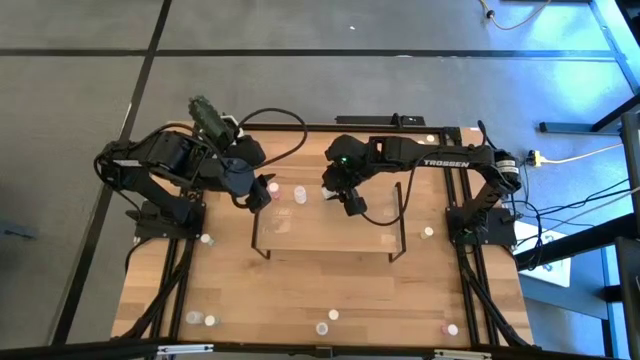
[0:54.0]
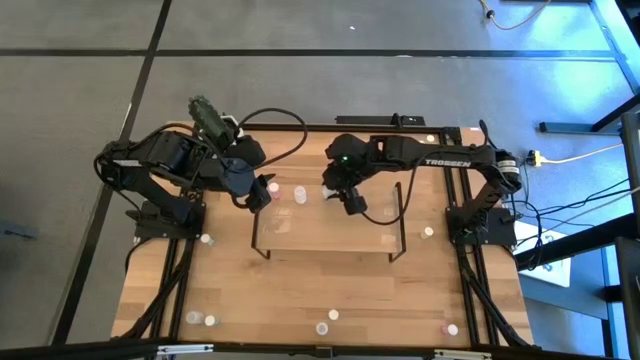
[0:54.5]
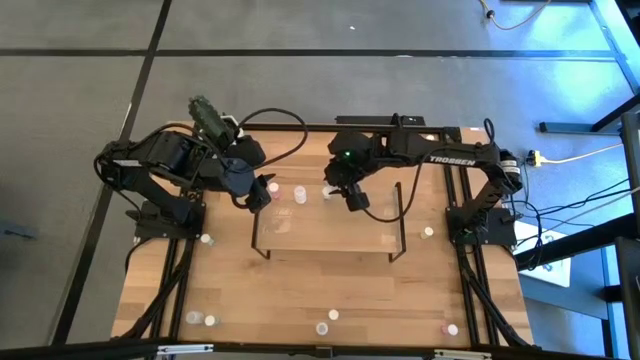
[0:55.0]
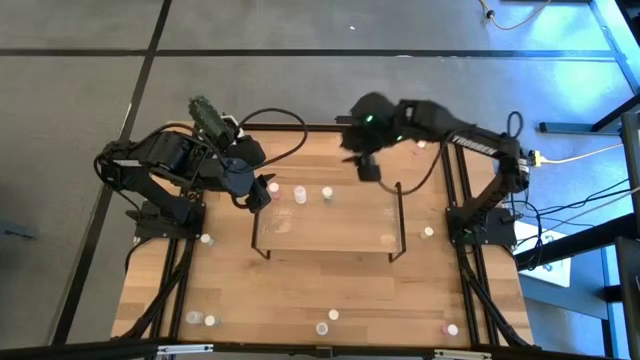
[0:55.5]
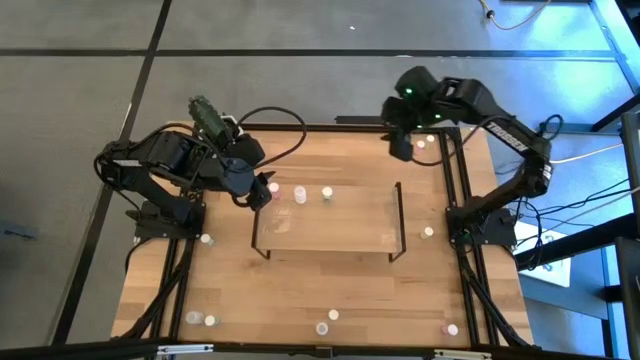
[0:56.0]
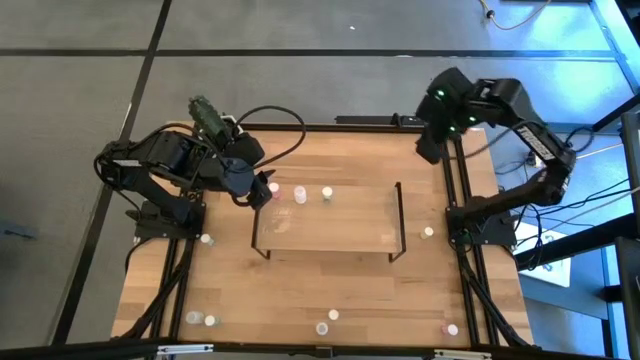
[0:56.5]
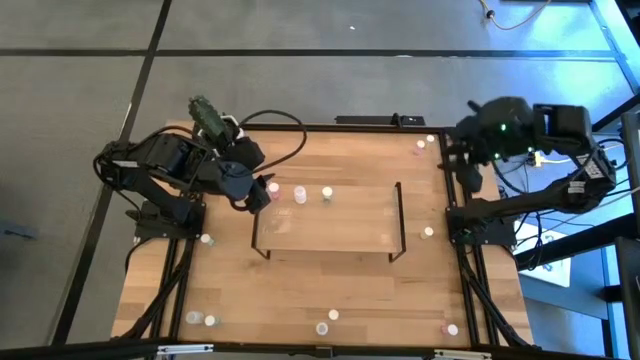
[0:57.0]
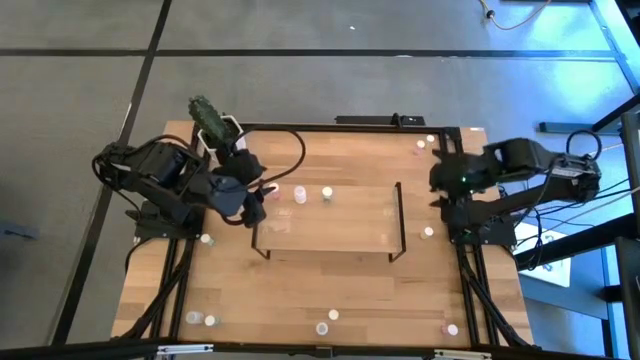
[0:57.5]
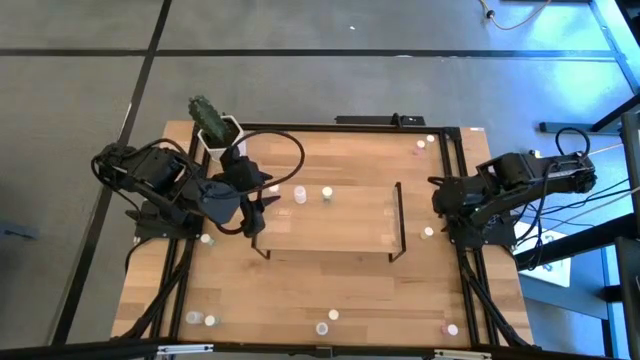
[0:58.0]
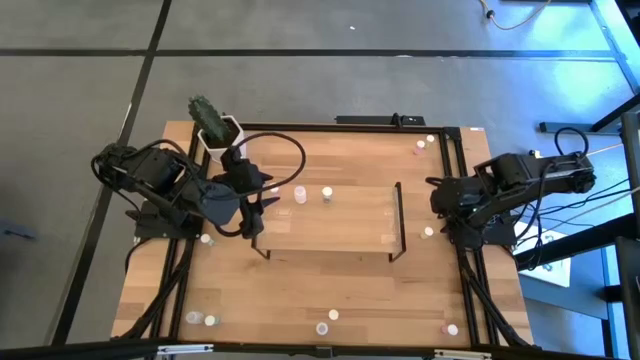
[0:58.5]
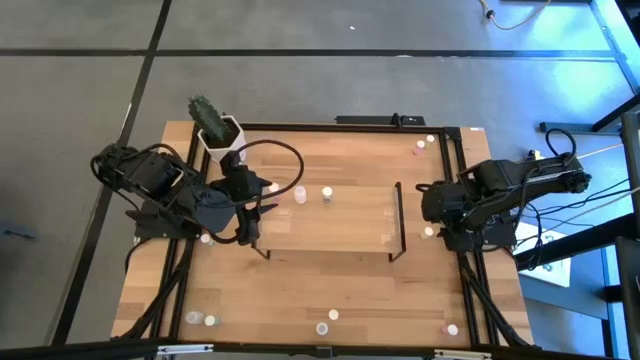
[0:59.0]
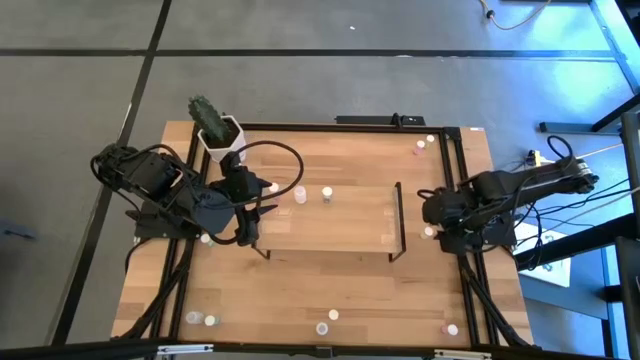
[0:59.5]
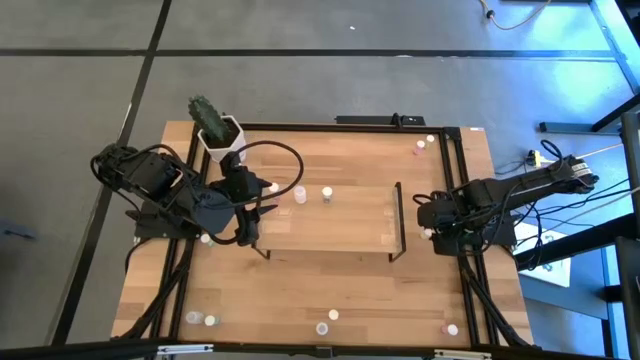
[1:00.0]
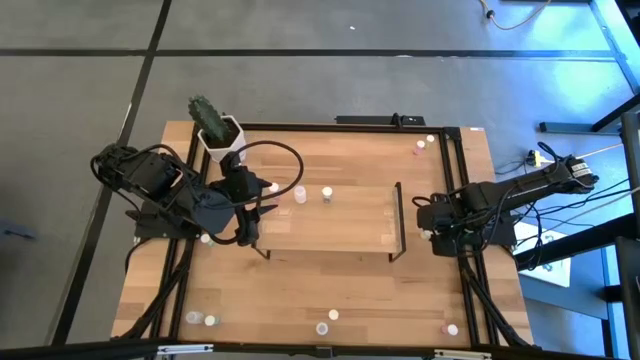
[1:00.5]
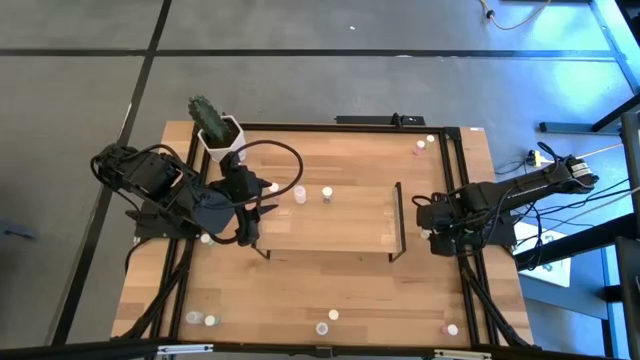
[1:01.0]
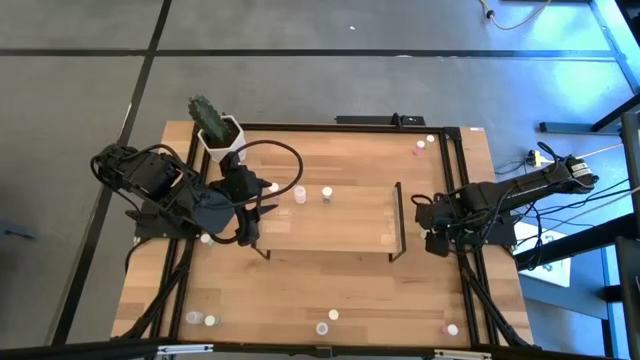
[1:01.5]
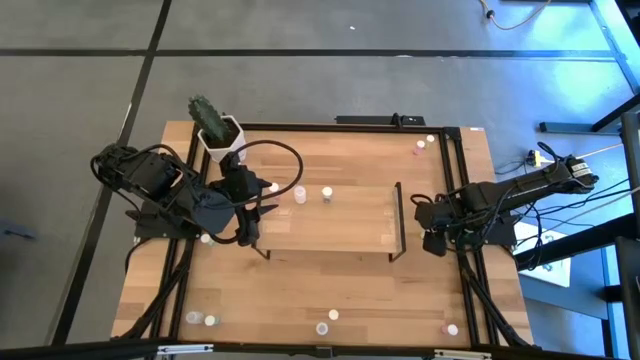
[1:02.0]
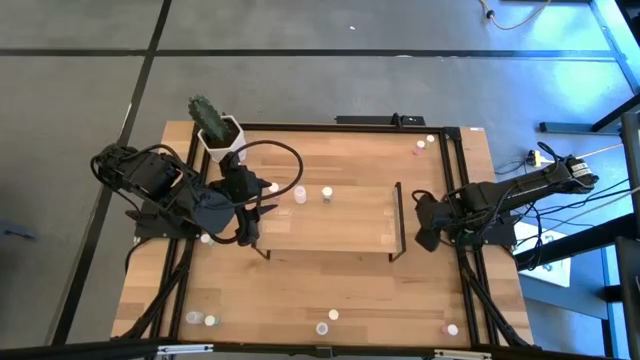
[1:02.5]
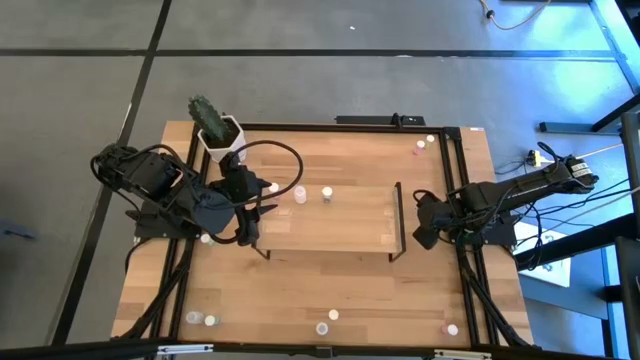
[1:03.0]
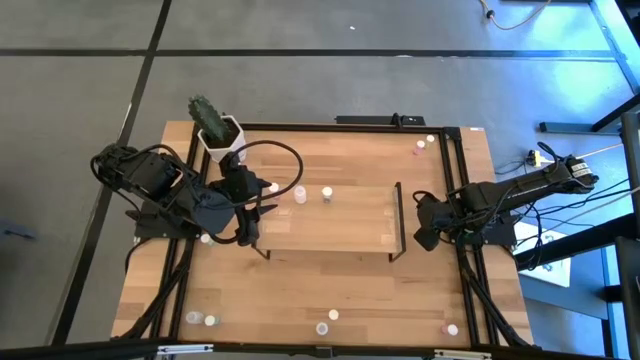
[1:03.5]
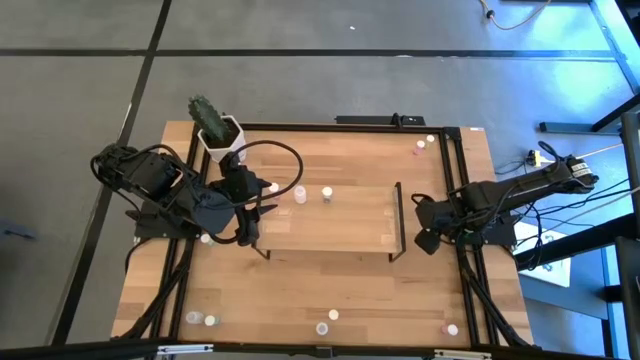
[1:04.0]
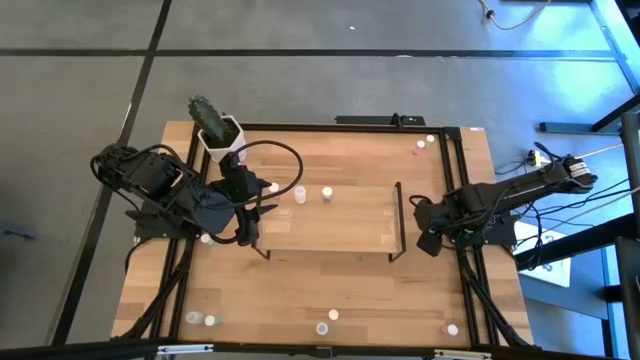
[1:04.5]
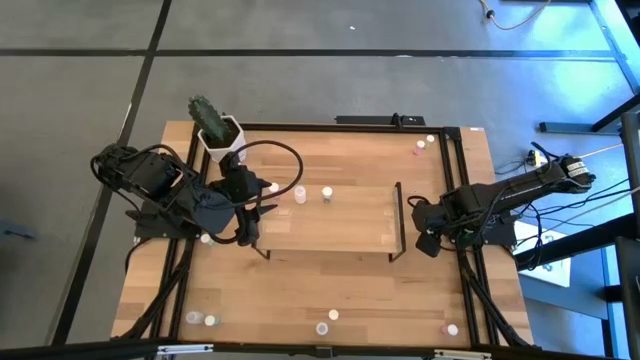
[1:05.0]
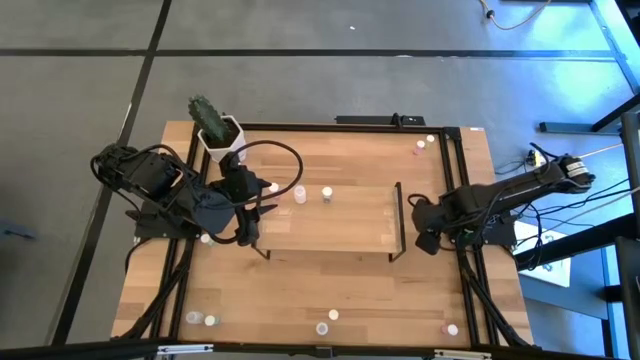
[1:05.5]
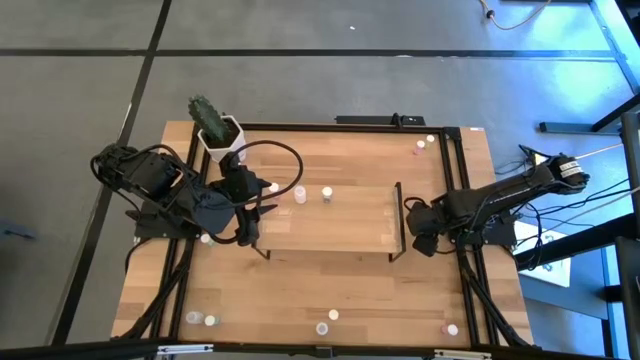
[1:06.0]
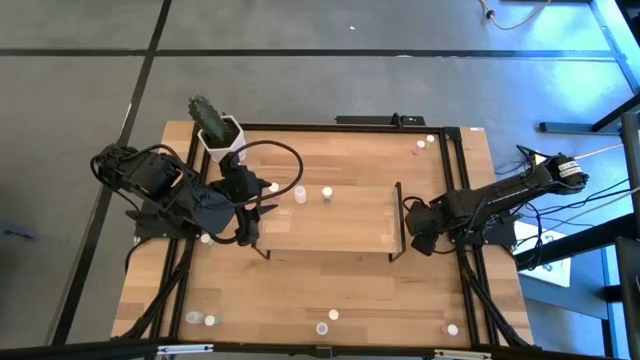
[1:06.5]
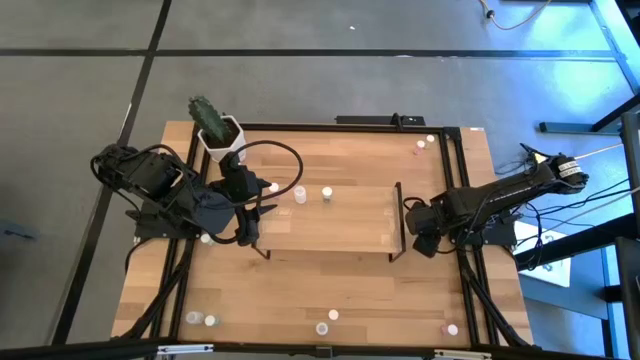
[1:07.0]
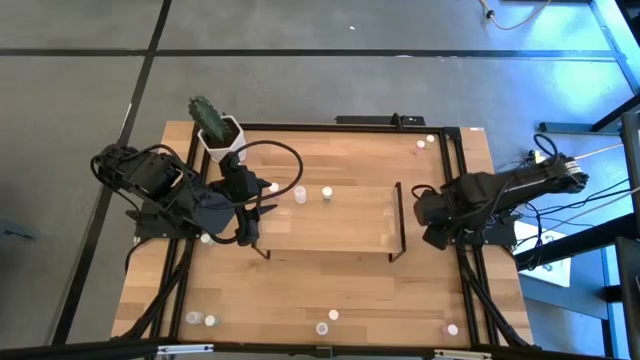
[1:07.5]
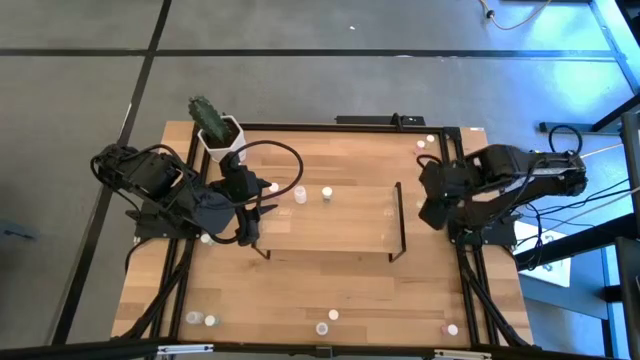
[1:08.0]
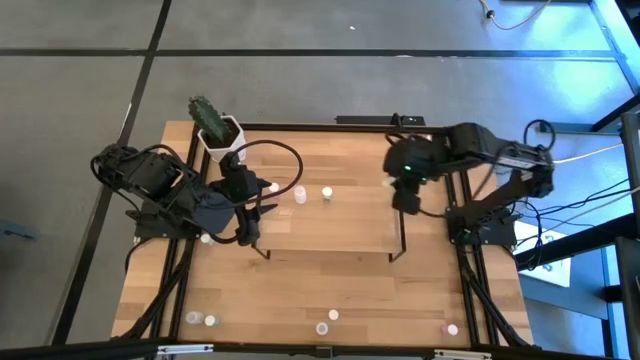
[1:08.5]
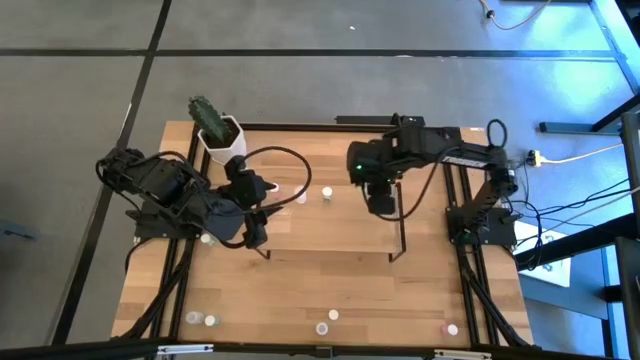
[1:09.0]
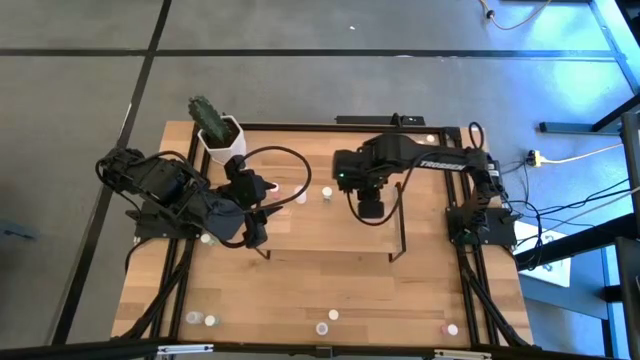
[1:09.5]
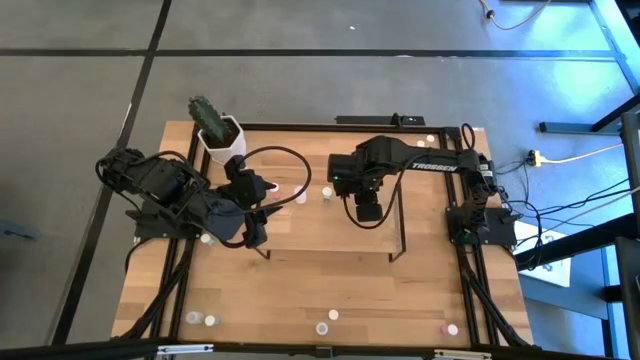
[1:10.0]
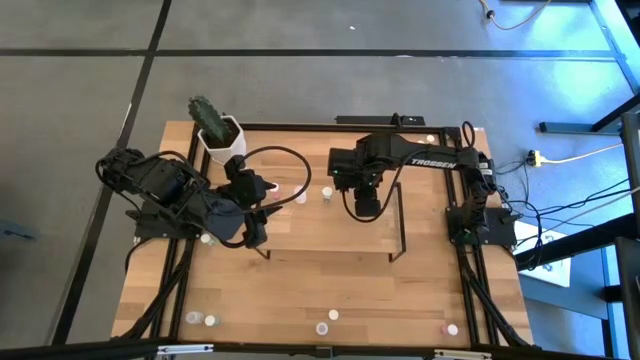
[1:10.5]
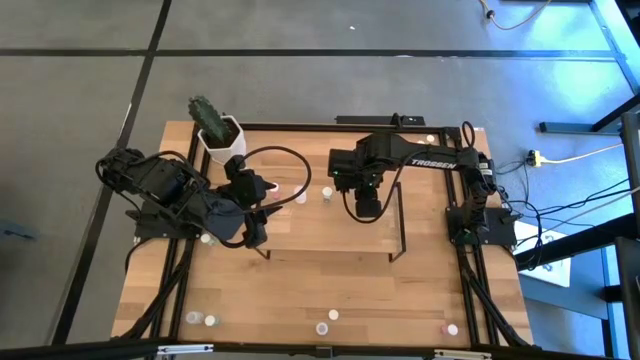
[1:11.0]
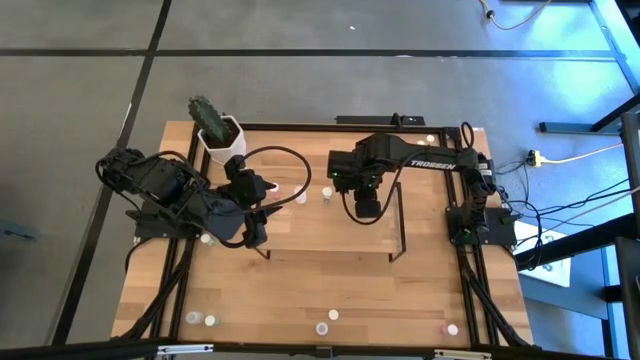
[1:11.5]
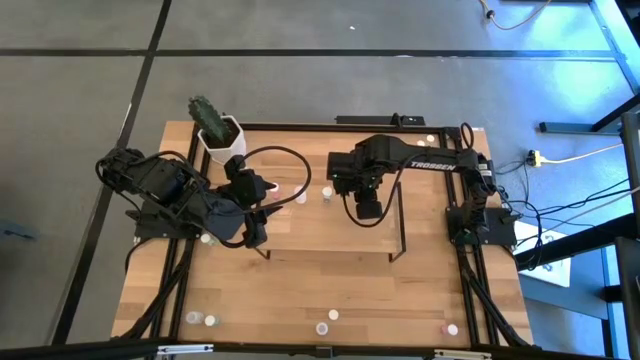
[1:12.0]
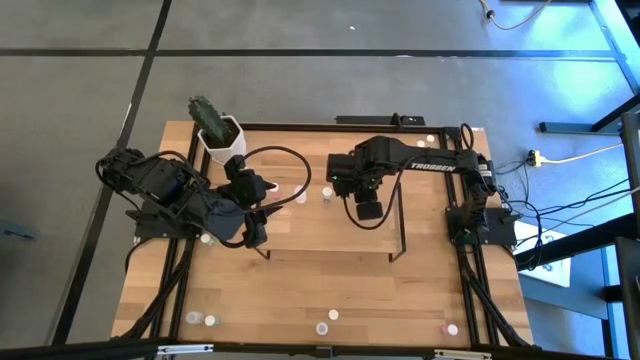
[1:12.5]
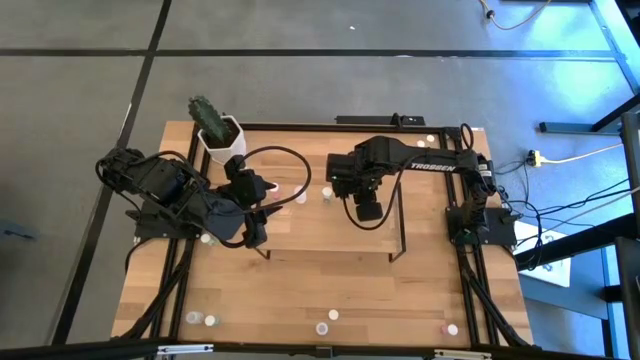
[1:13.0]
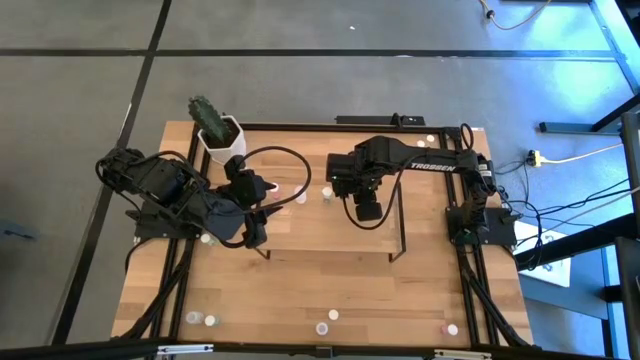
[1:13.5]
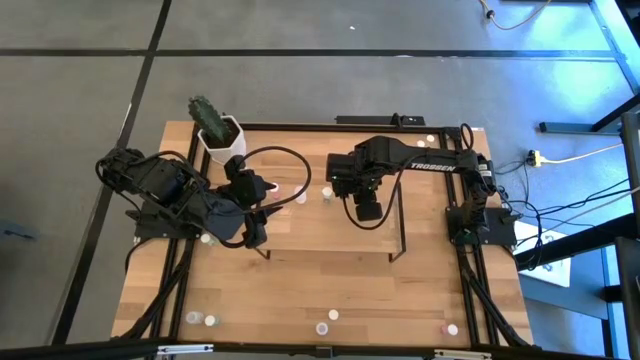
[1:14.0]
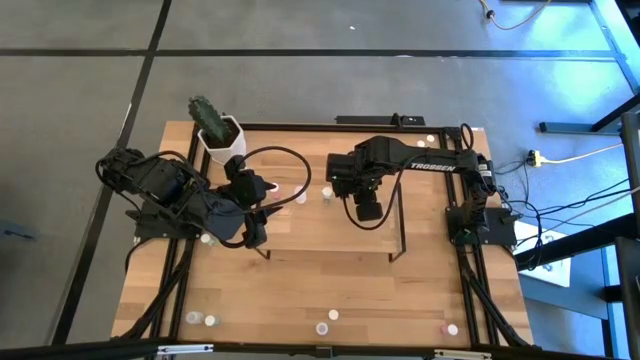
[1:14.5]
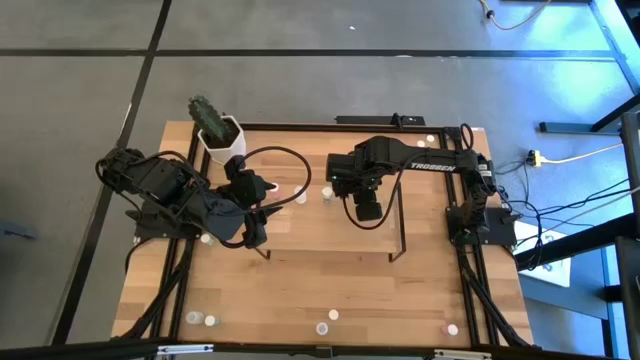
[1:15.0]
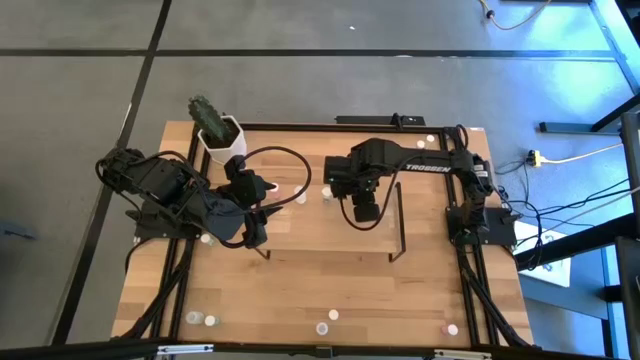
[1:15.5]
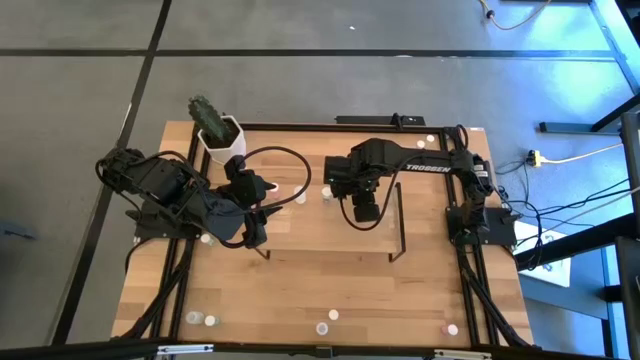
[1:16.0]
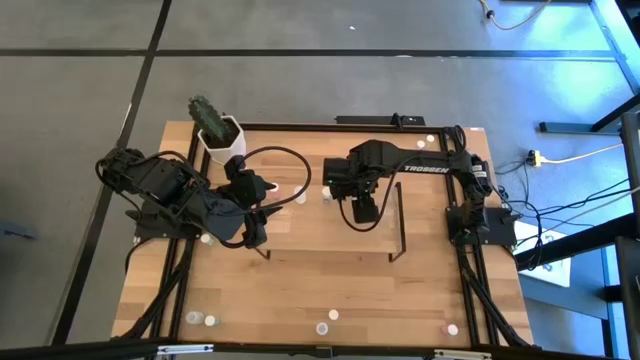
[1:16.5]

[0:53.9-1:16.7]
Task: Pick and place medicine bottles onto shelf by color
Put the middle yellow pill bottle on the shelf
